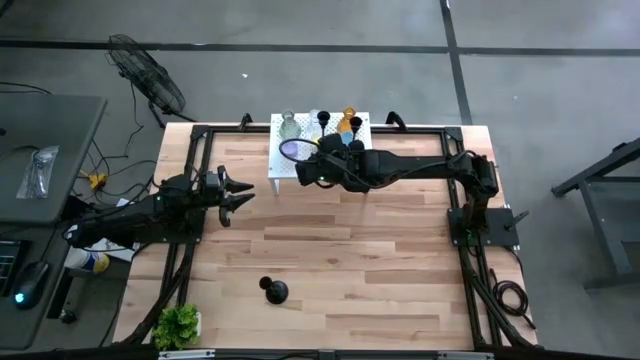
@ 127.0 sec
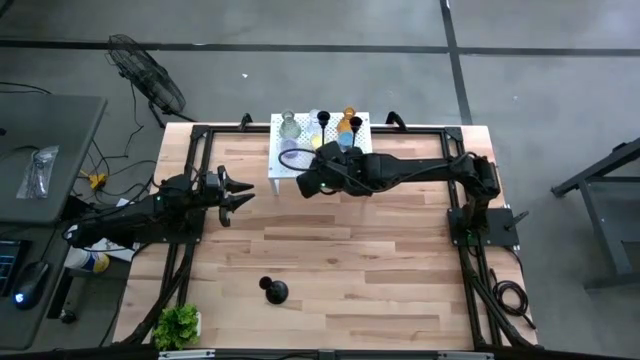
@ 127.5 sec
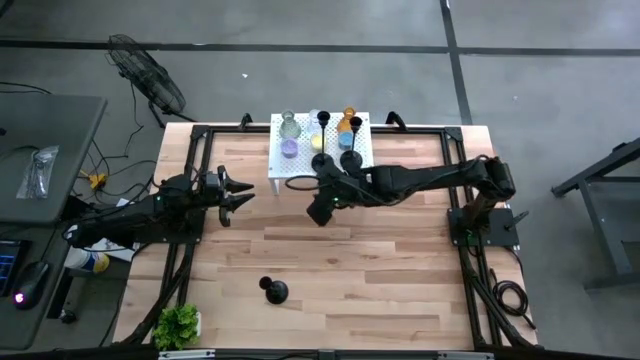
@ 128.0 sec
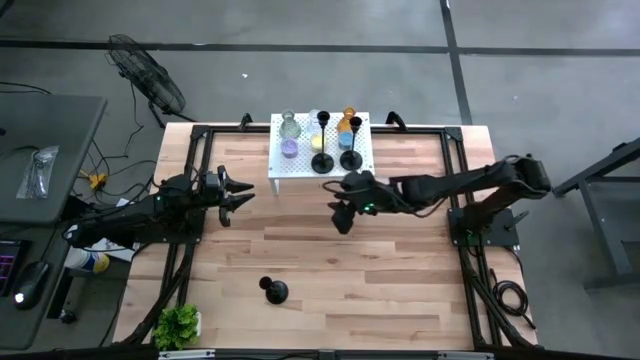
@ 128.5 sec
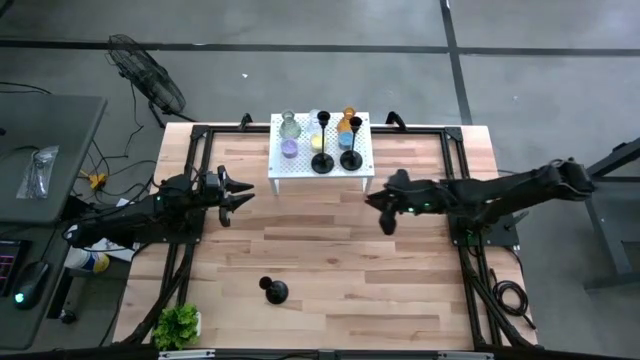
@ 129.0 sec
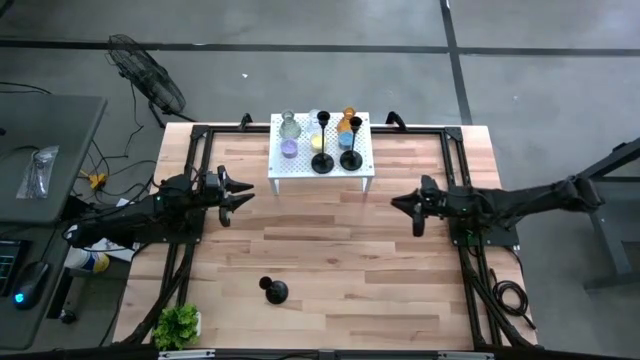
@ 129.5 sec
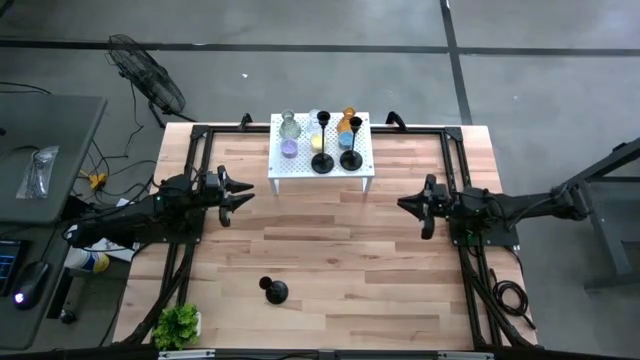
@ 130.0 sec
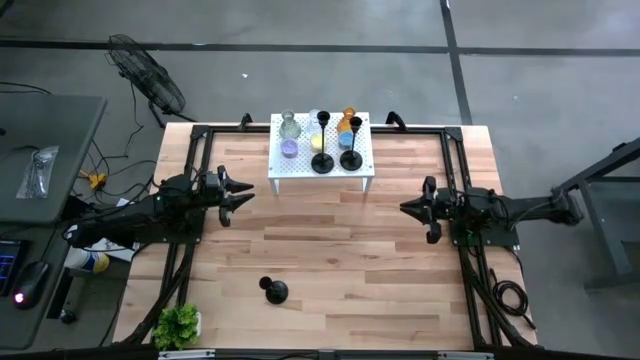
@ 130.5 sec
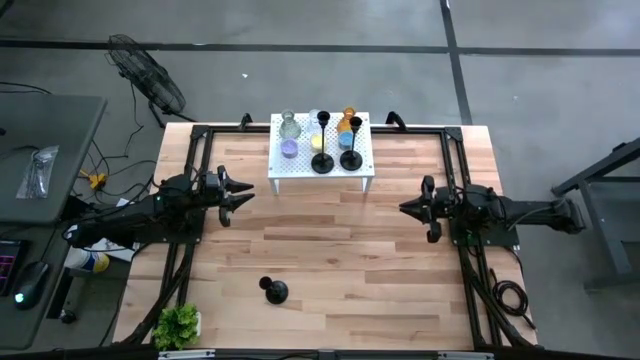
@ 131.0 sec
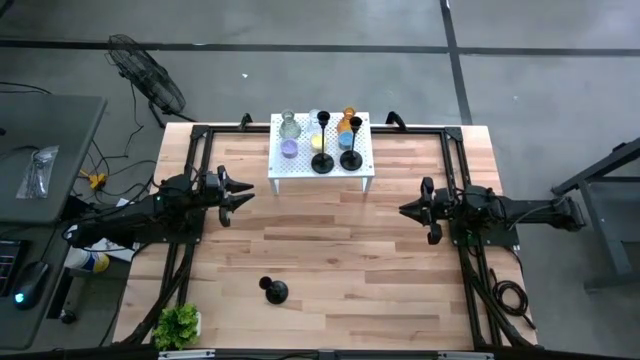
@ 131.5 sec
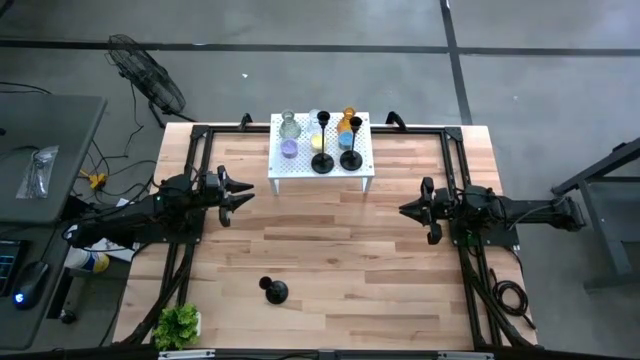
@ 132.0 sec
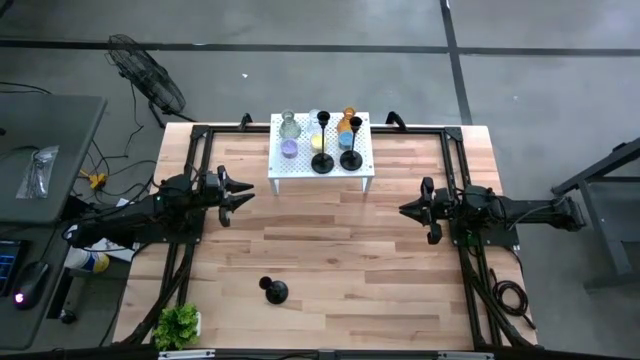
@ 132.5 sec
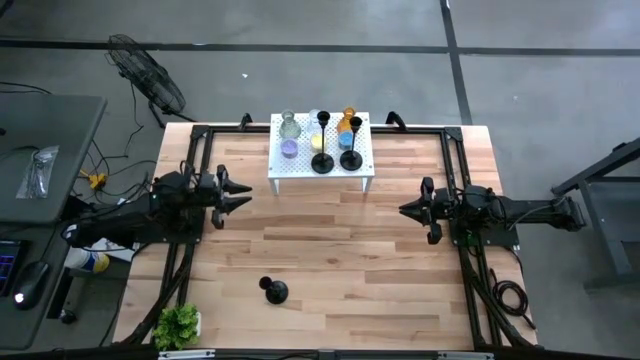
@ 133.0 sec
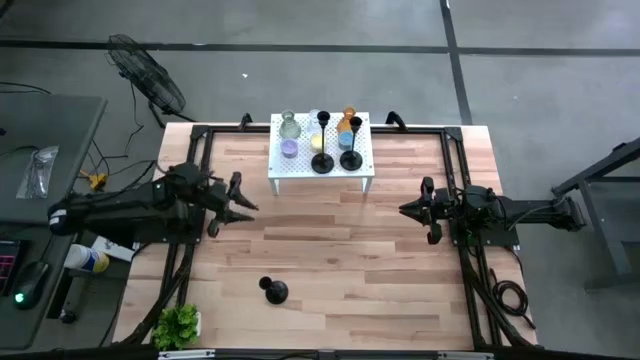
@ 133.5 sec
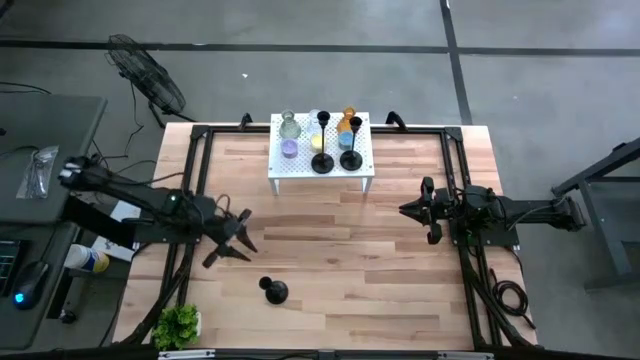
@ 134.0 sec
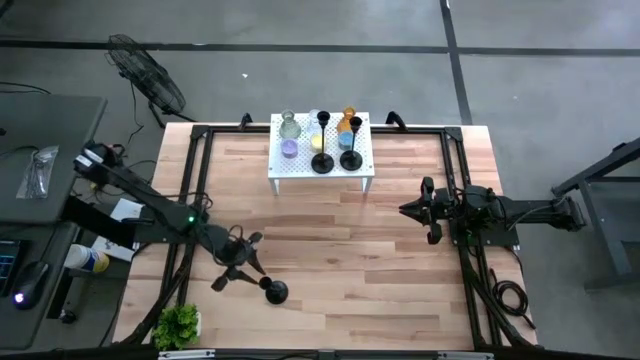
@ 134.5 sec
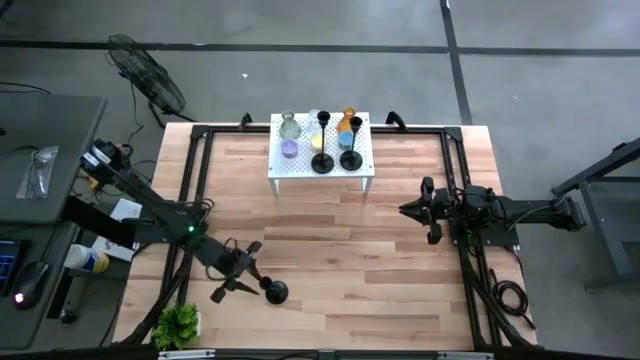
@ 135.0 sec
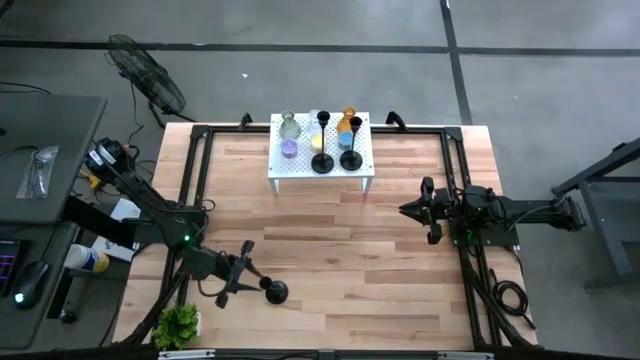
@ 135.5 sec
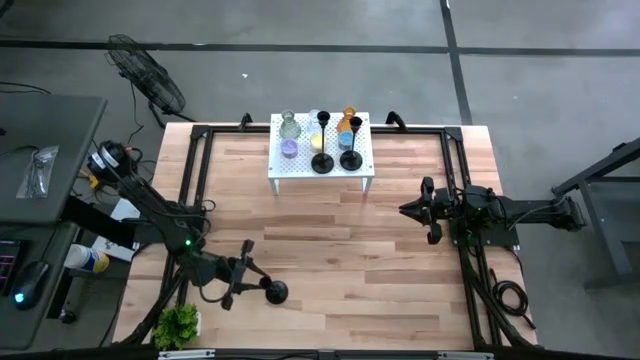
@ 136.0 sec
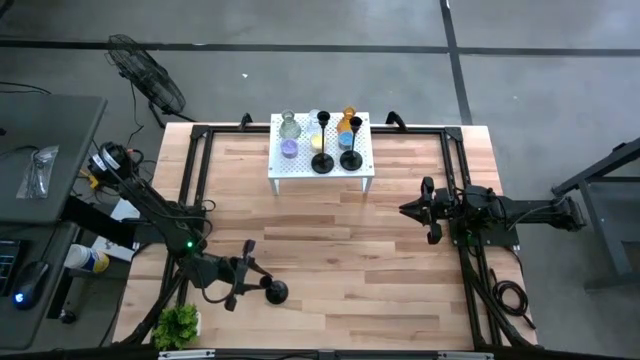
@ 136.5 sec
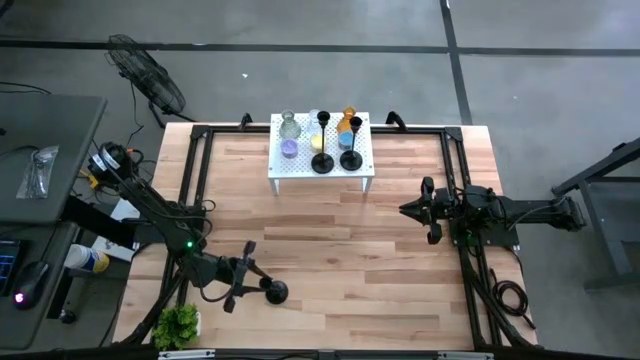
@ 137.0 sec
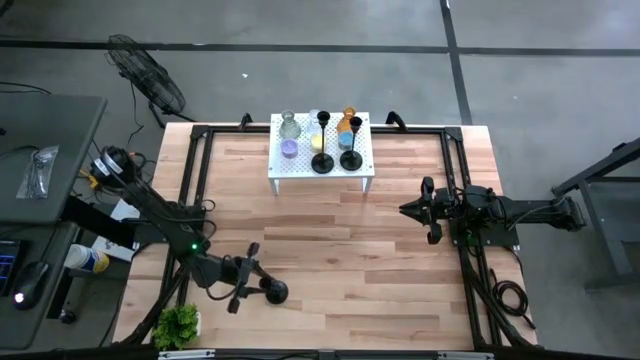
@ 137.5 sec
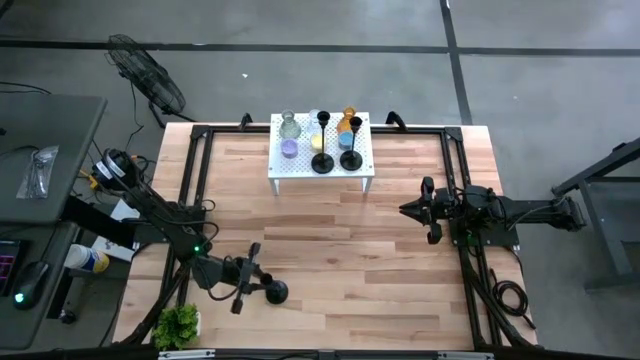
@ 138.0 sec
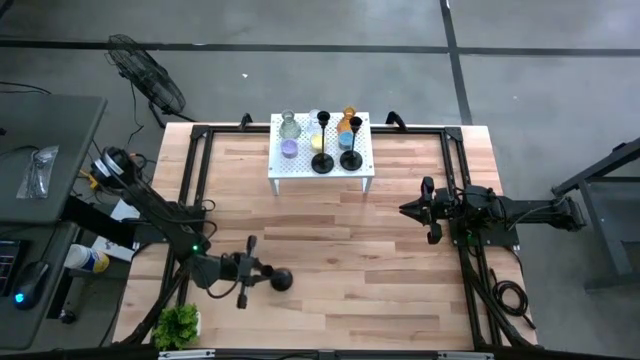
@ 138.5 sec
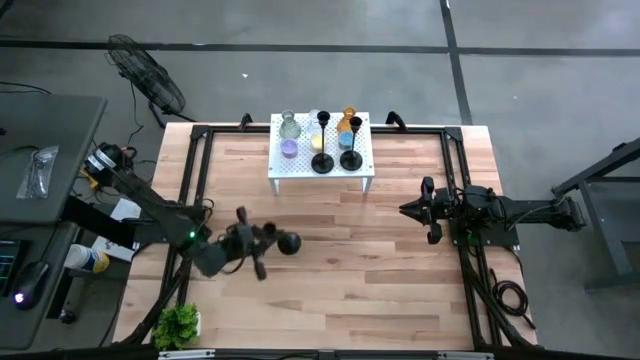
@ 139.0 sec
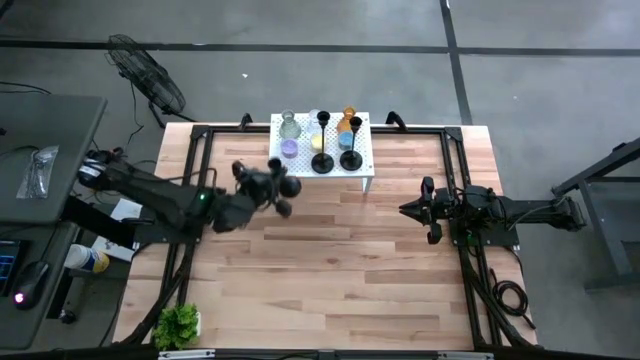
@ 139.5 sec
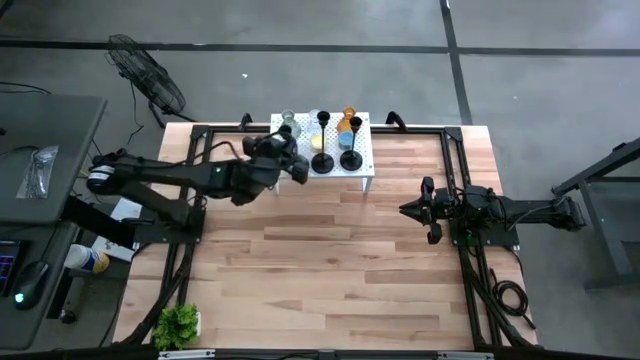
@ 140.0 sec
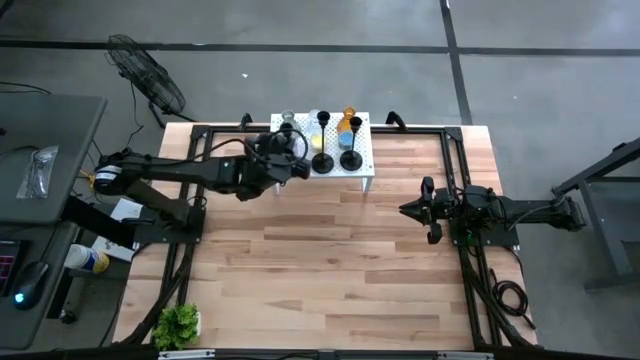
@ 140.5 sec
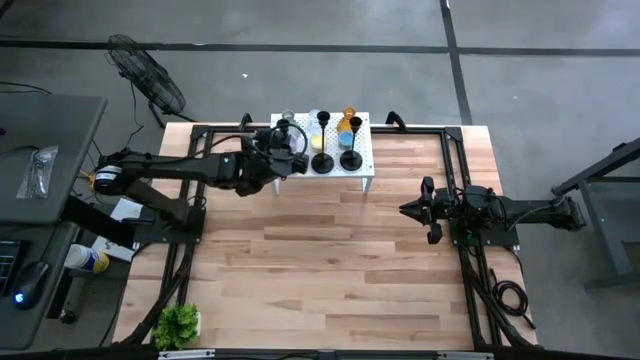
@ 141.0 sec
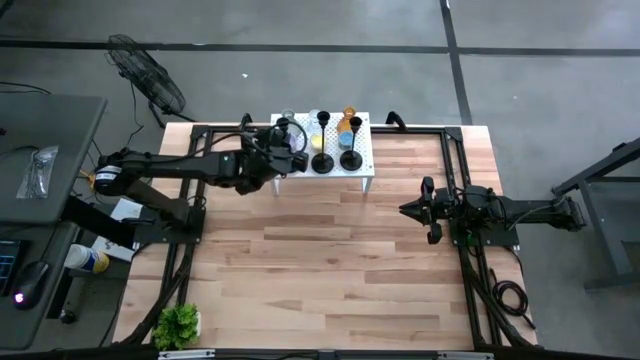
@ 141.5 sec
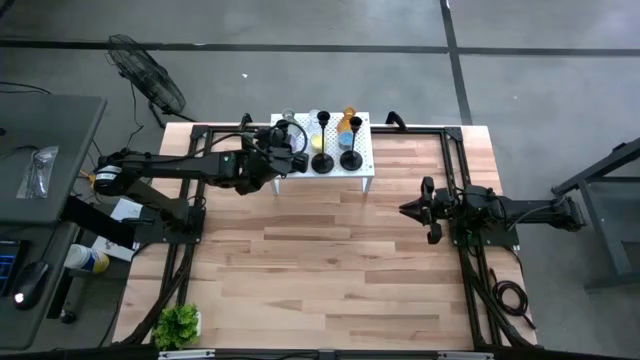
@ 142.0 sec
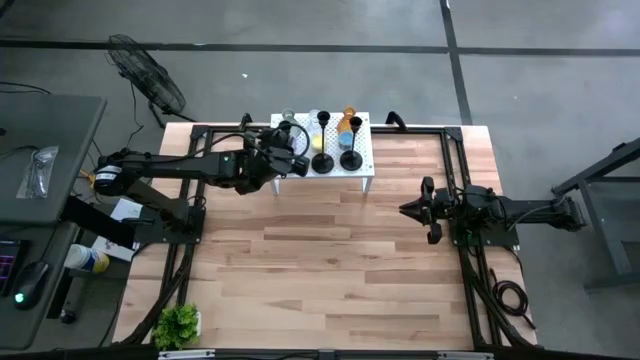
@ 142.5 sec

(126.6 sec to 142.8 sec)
Task: Pick & Place candle stick holders
Put the black candle holder on the shelf aligned with the other black candle holders

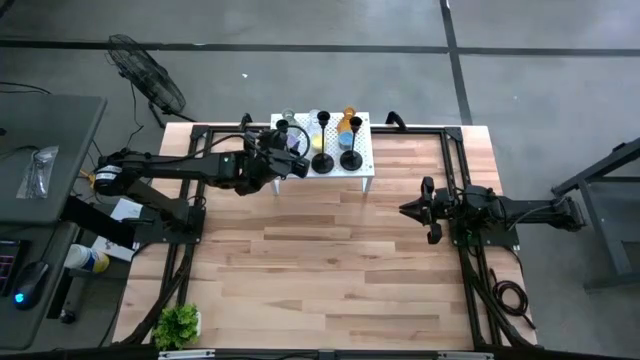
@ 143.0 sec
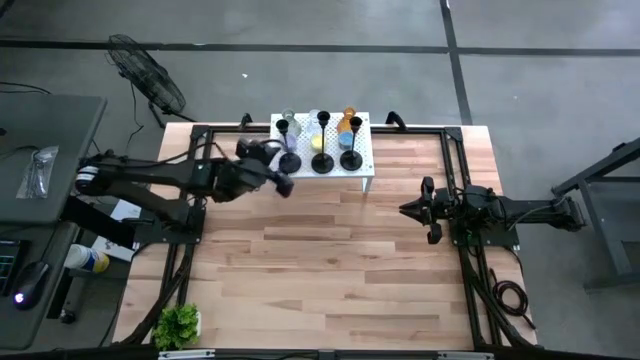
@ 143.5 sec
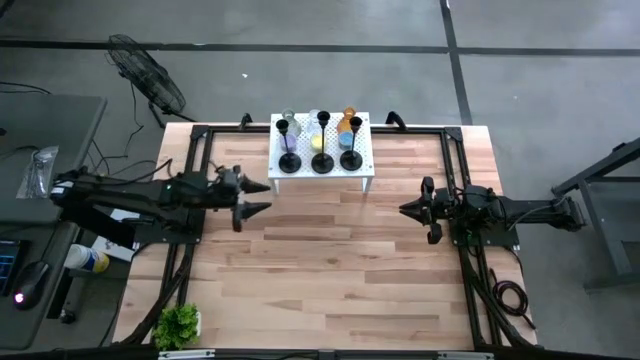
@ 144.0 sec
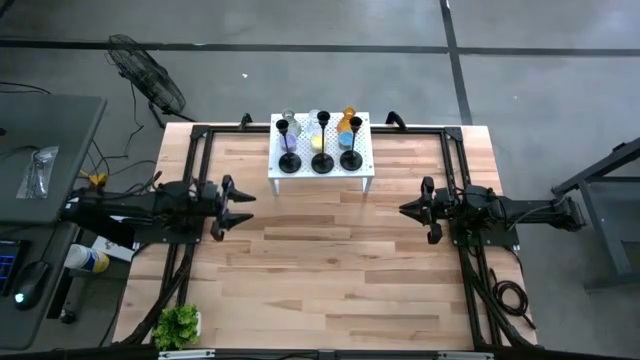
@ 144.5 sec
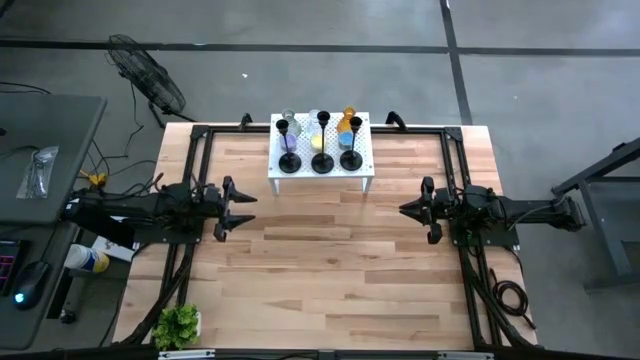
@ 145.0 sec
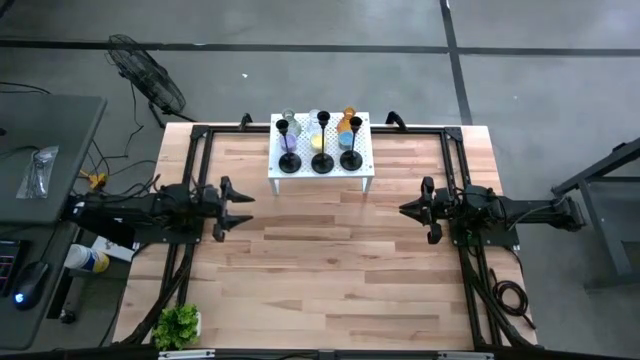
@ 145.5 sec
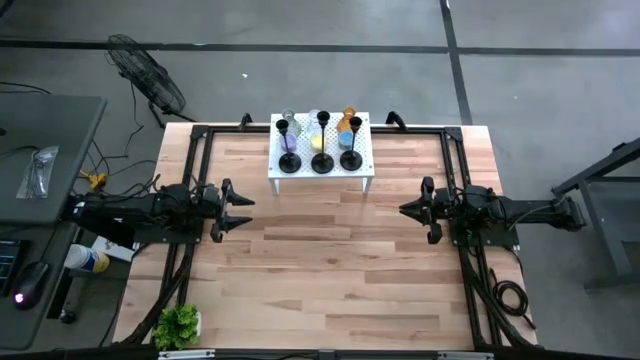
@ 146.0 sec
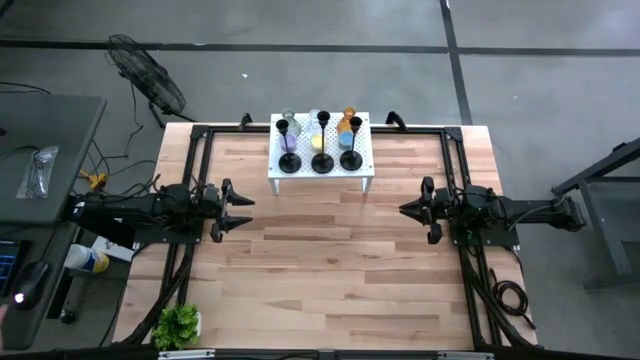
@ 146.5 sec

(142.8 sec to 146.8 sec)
Return to Home Position

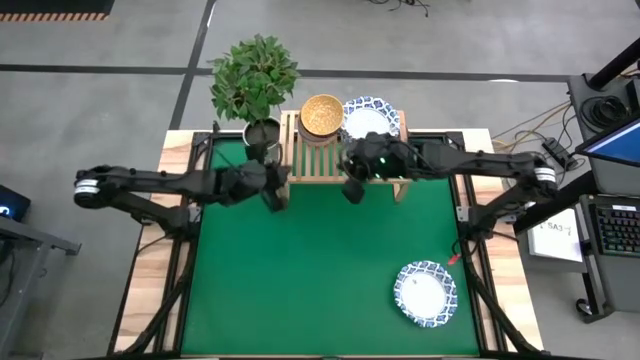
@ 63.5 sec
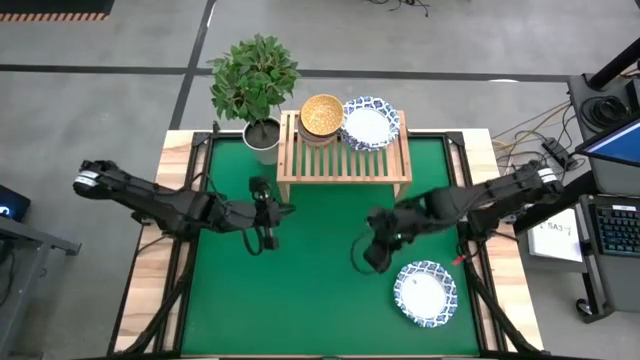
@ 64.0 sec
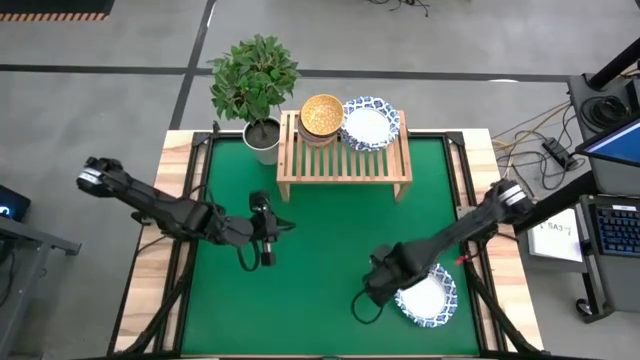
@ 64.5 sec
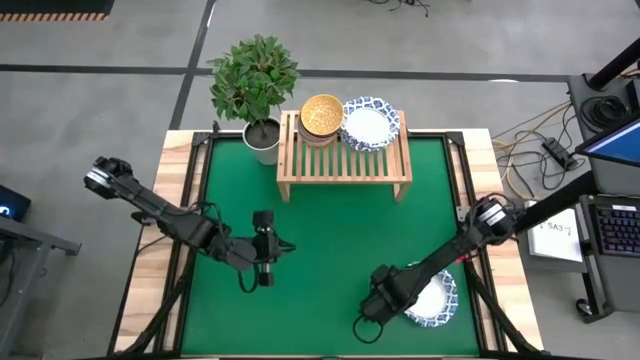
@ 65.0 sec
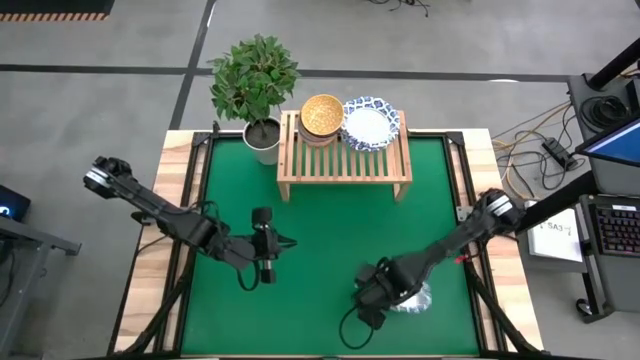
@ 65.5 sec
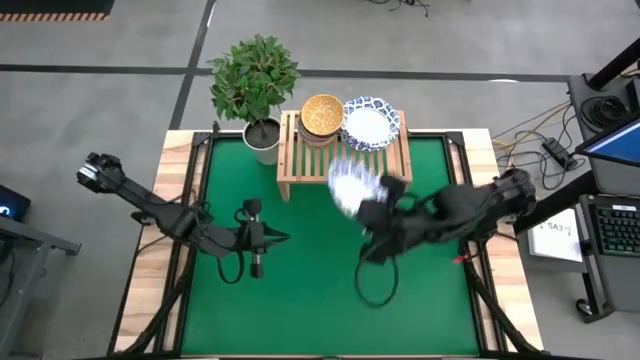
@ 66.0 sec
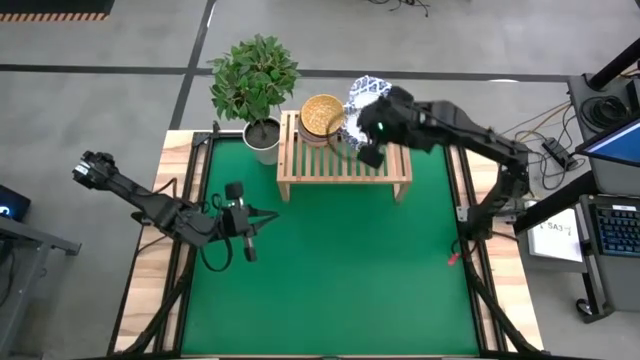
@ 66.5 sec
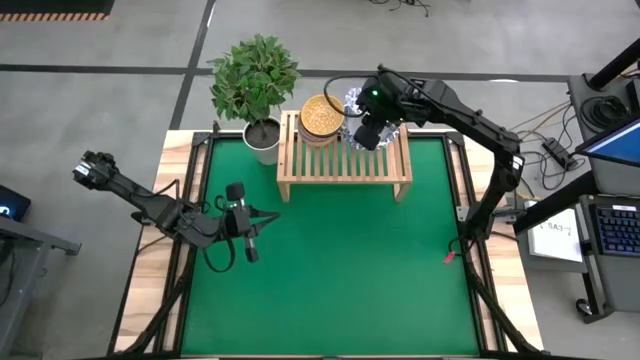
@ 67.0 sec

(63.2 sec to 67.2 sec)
Task: Place and stack bowls onto a shelf
Stack the blue patterned bowl on top of the blue patterned bowl on the shelf
